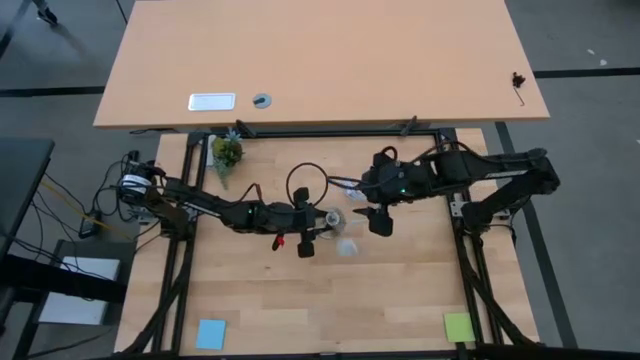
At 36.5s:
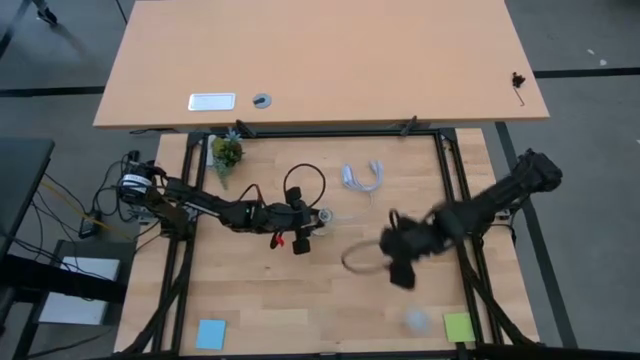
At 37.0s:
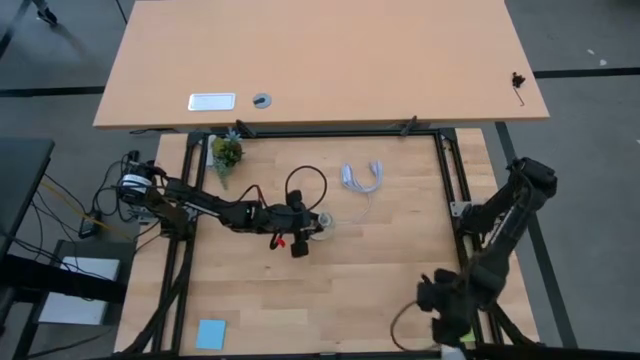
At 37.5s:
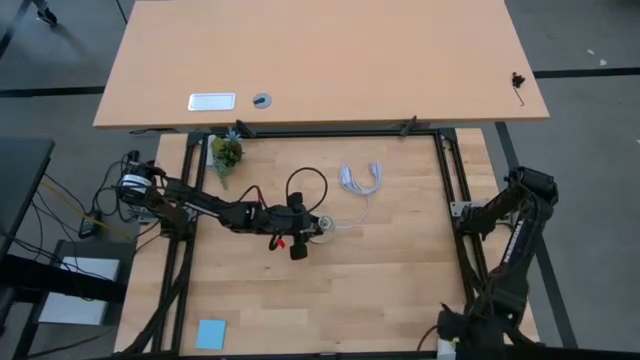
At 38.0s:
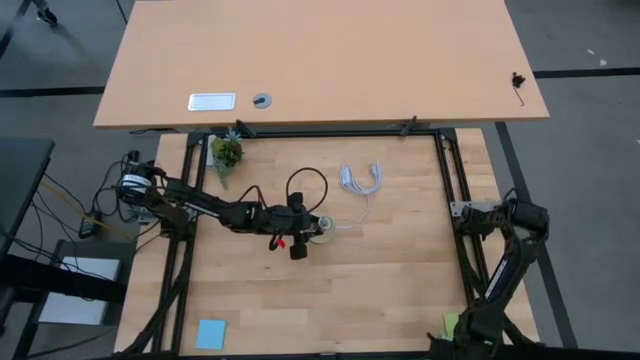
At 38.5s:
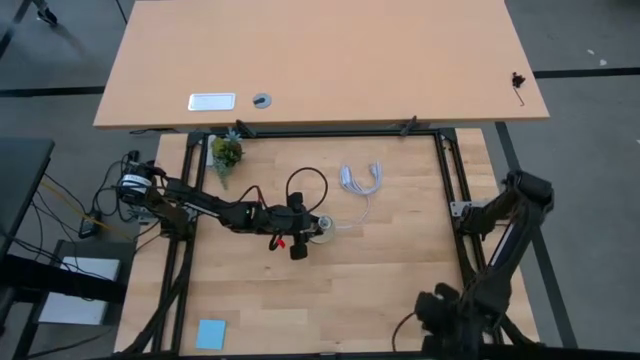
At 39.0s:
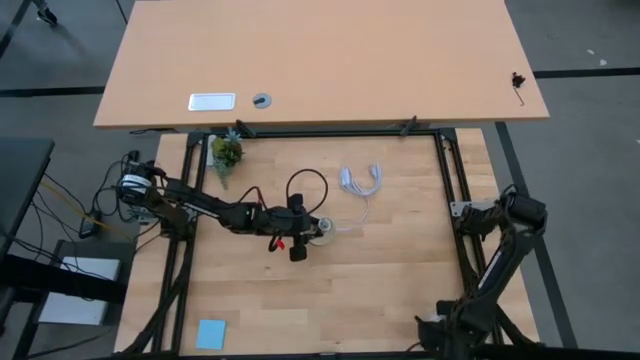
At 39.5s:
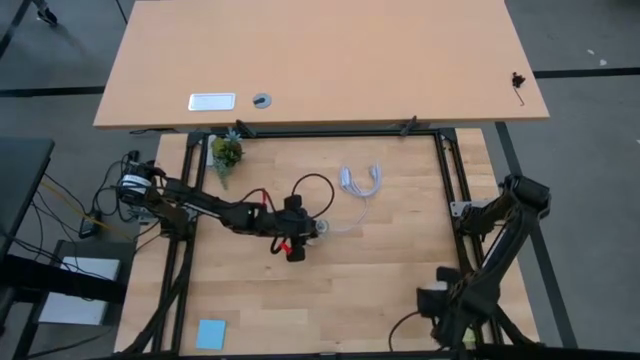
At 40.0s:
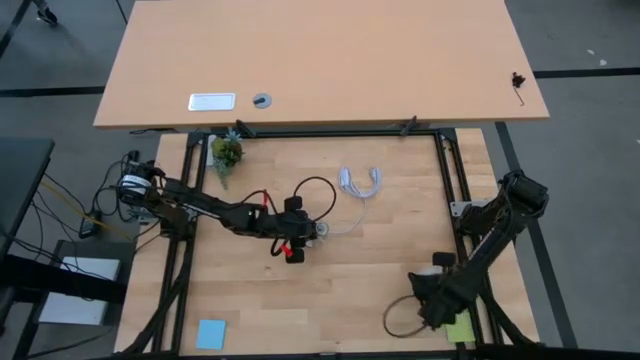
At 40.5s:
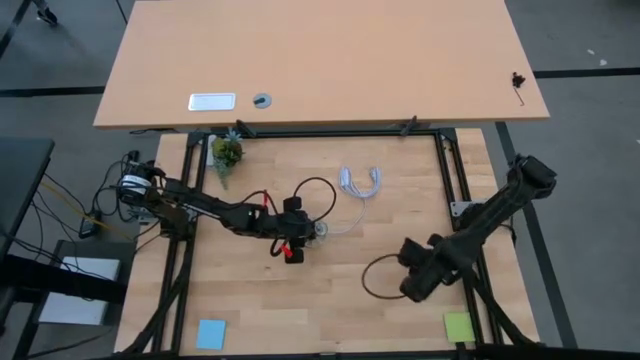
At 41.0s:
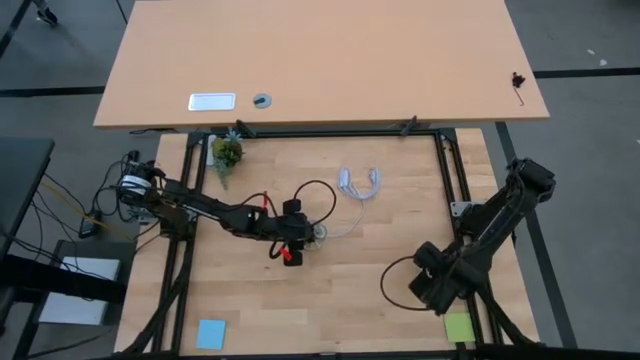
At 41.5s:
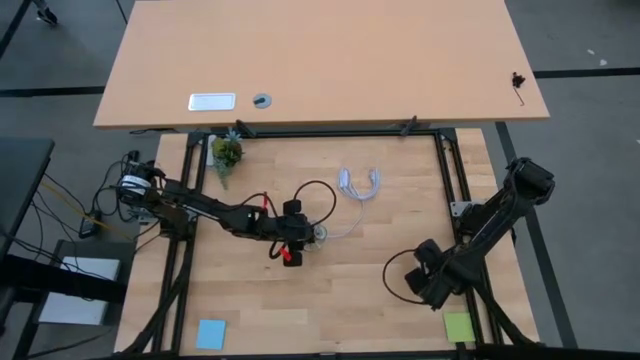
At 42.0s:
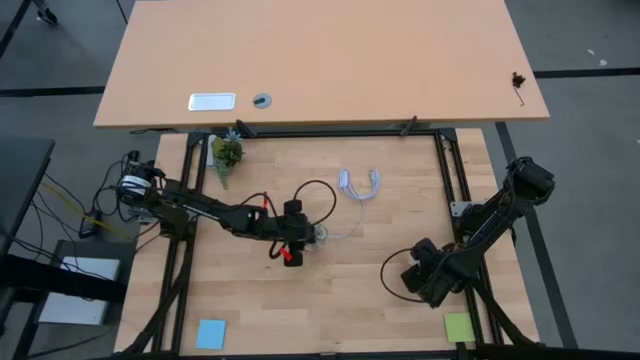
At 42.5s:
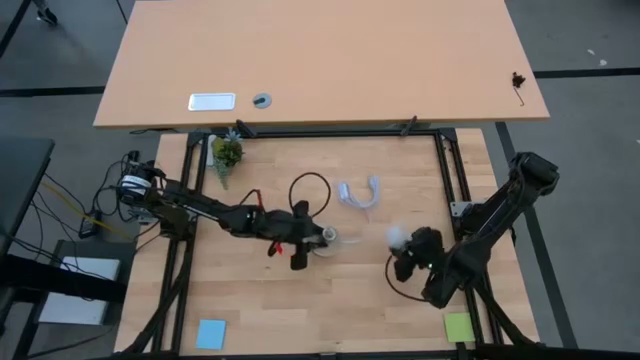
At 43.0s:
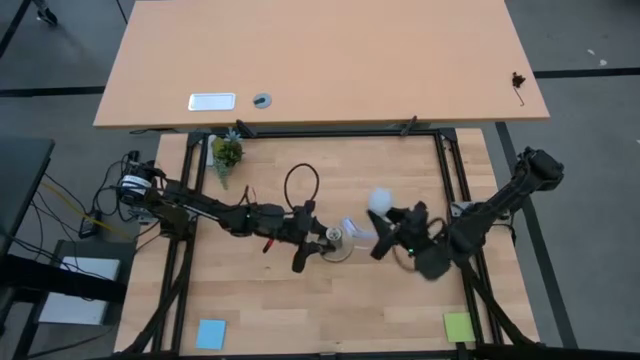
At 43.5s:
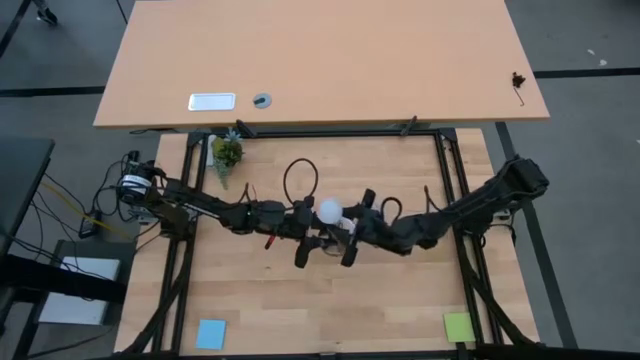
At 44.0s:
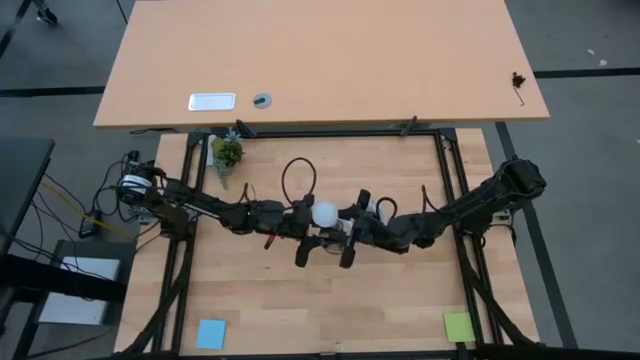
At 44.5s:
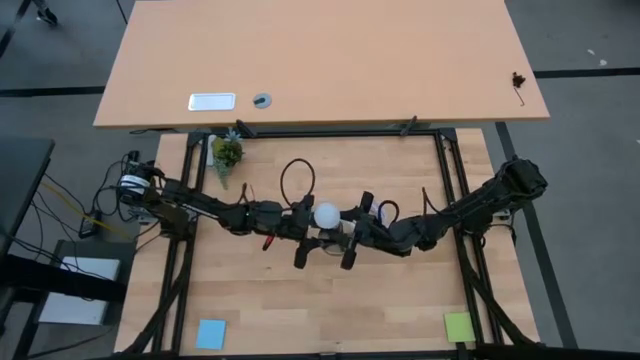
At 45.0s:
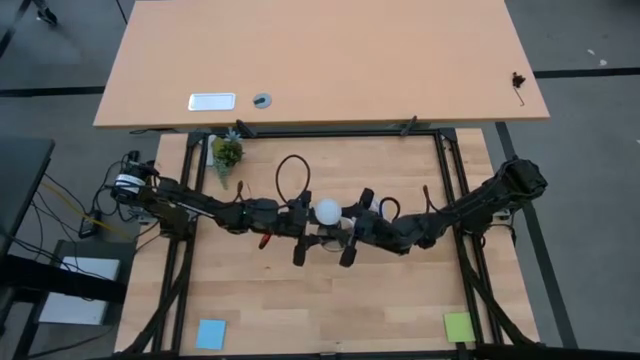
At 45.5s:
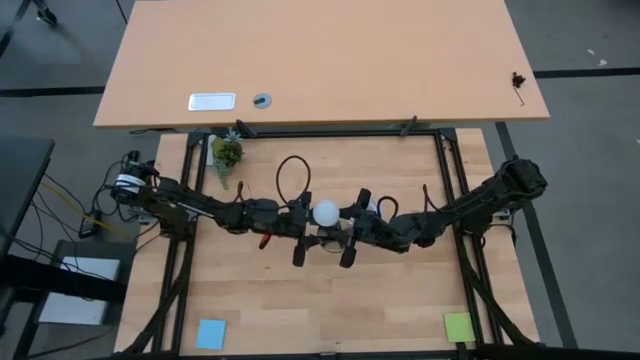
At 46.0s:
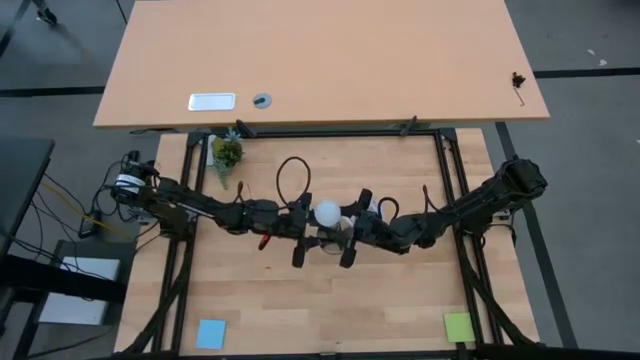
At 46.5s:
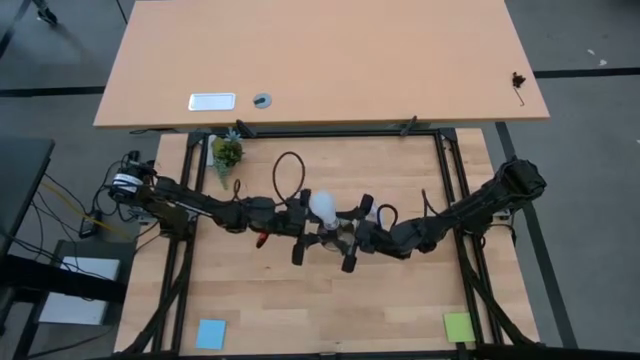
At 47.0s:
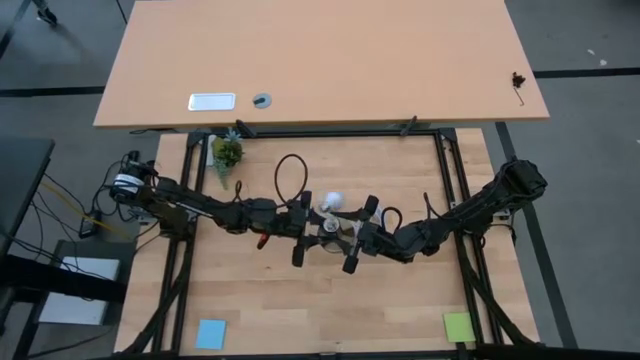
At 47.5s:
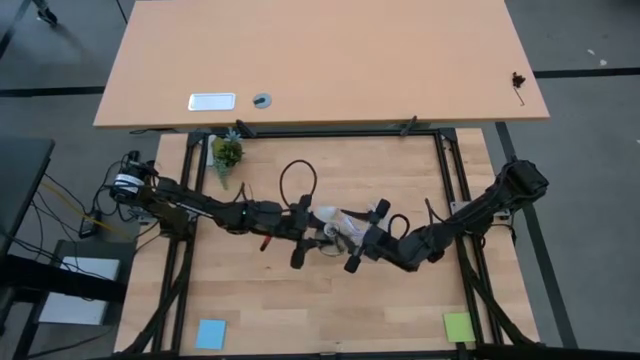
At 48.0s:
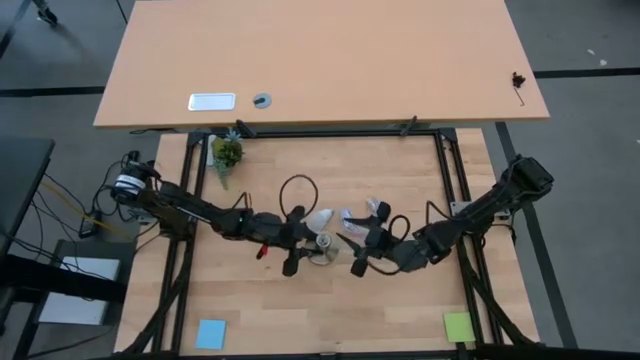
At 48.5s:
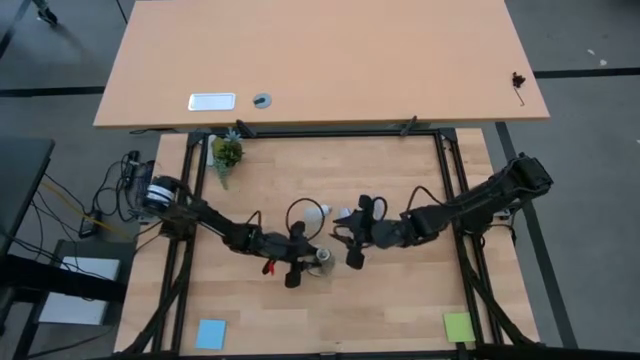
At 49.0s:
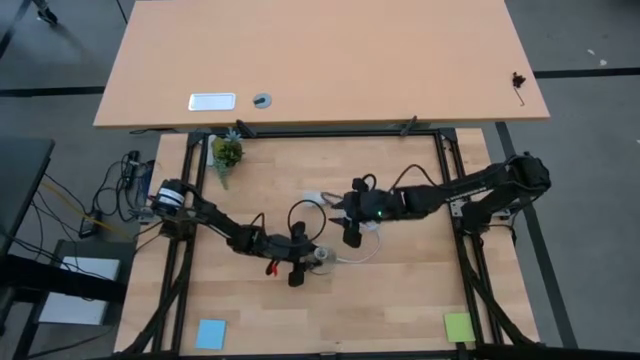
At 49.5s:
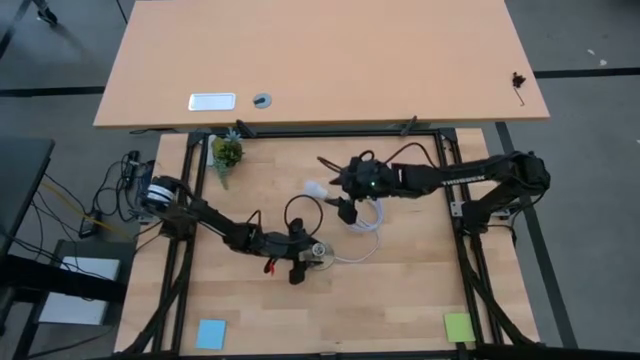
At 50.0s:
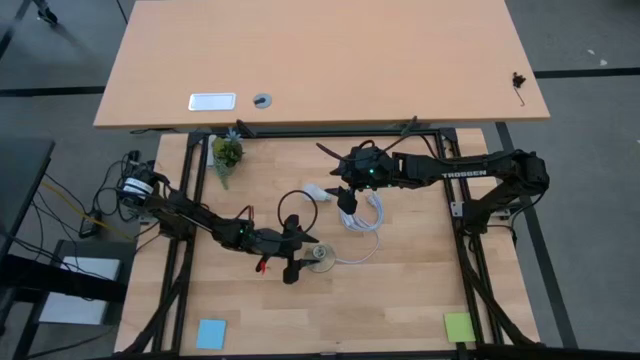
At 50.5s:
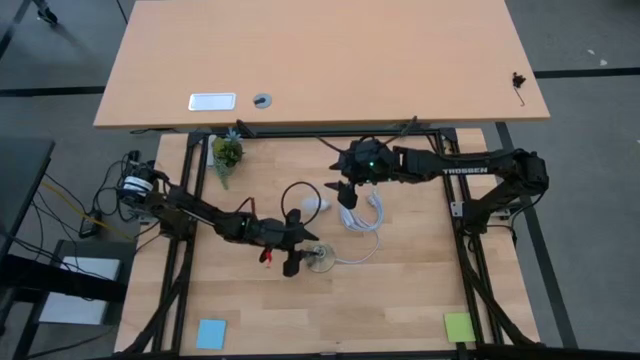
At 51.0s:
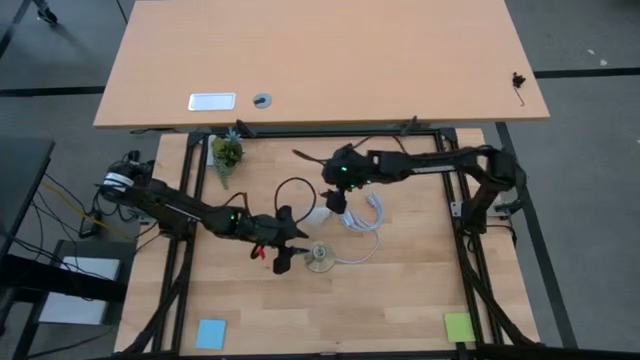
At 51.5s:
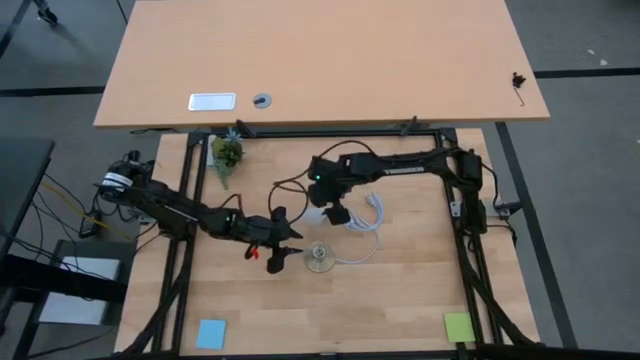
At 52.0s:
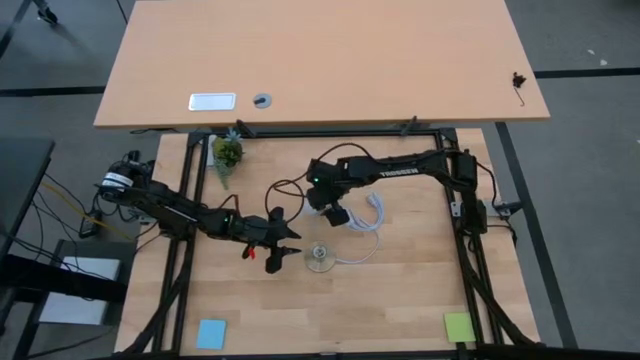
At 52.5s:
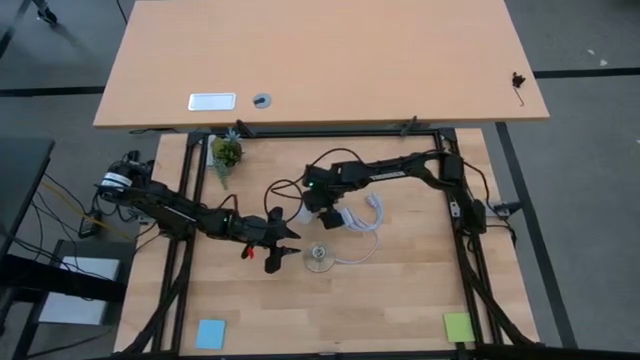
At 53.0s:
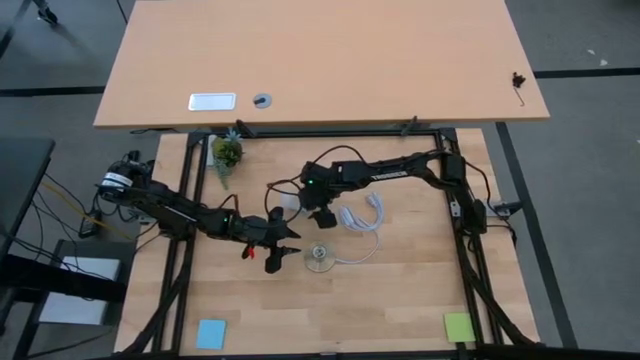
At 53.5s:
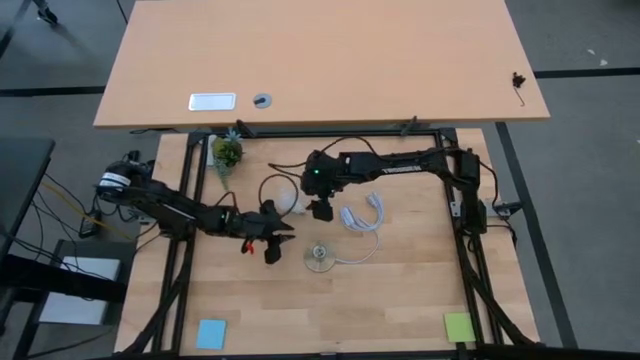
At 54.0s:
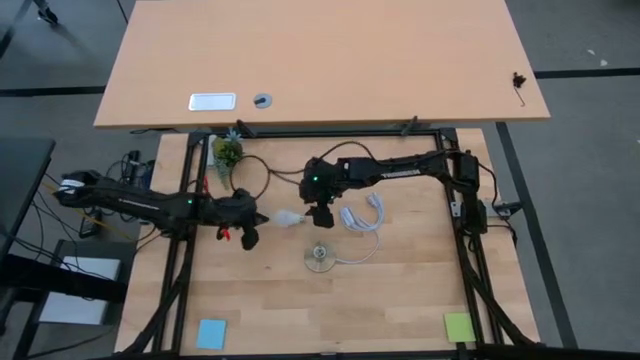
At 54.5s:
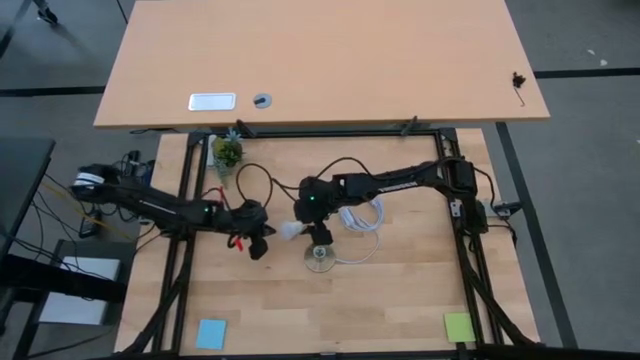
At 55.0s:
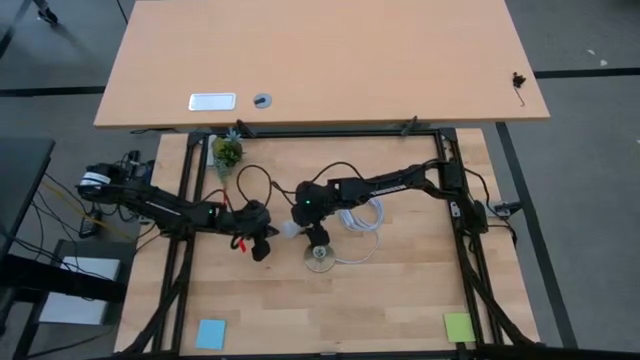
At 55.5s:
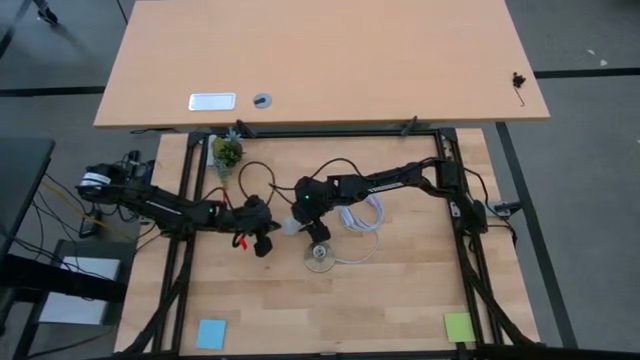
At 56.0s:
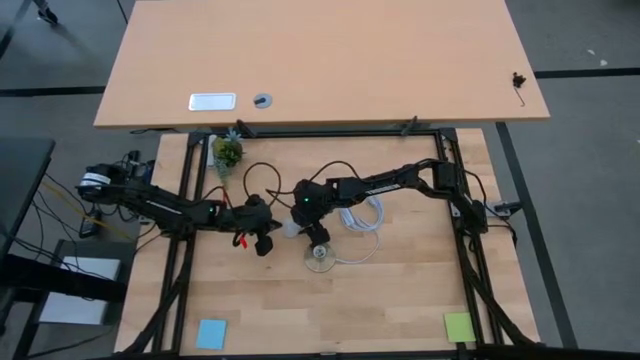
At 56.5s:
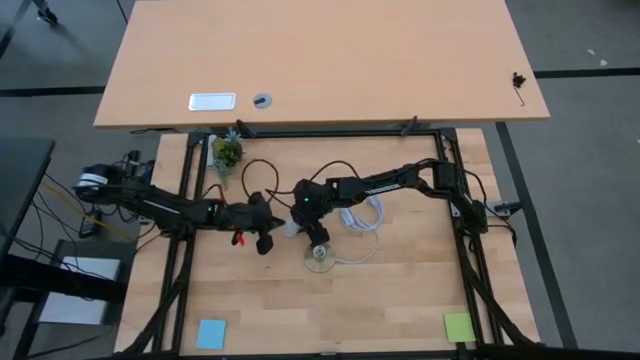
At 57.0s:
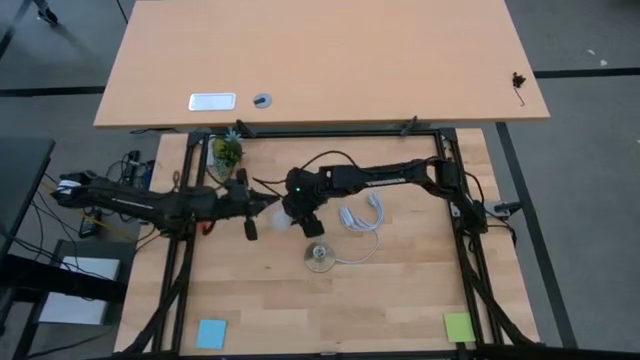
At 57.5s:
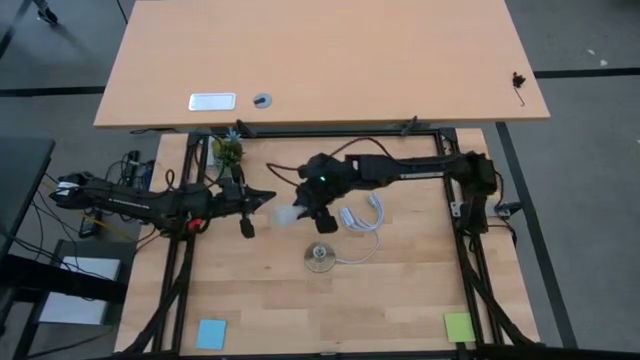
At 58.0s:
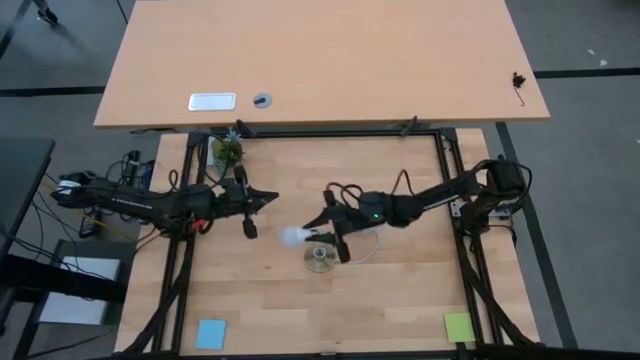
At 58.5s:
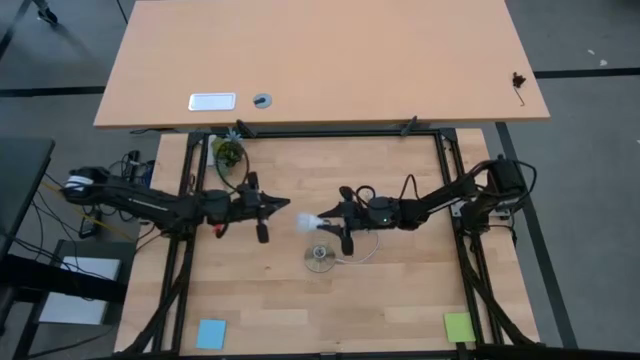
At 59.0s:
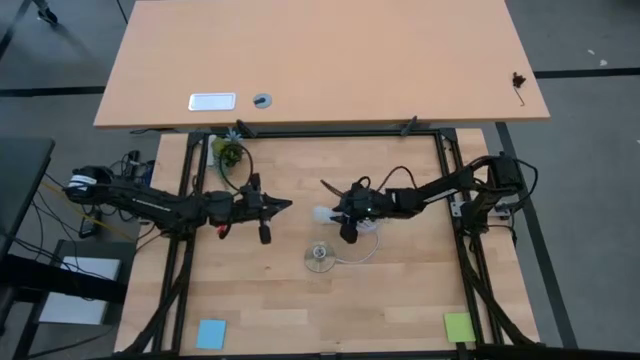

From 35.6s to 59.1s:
Task: Screw lightbulb
Insert the lightbulb into the lamp socket
